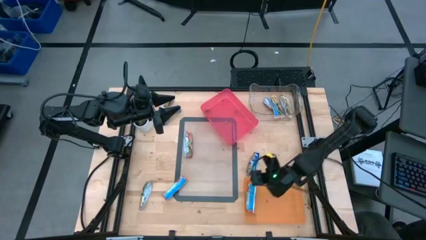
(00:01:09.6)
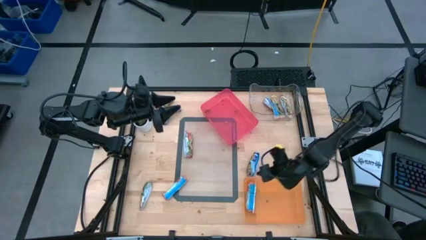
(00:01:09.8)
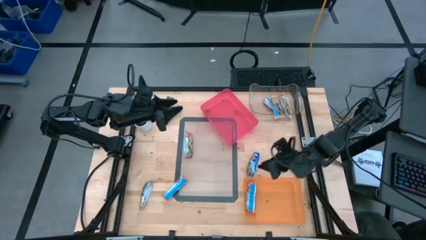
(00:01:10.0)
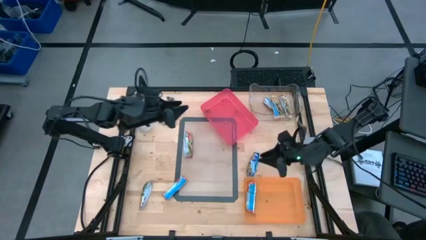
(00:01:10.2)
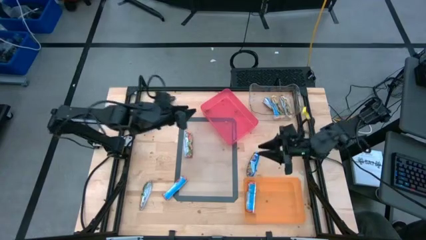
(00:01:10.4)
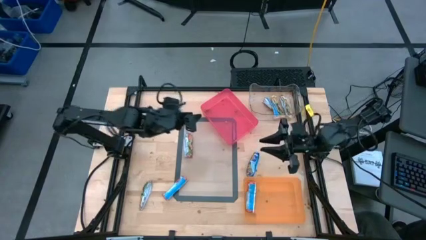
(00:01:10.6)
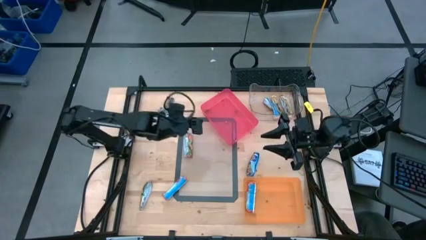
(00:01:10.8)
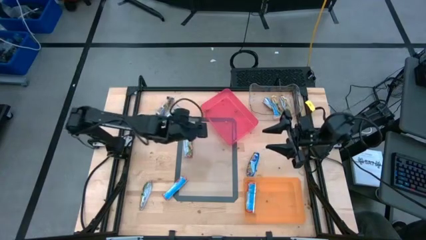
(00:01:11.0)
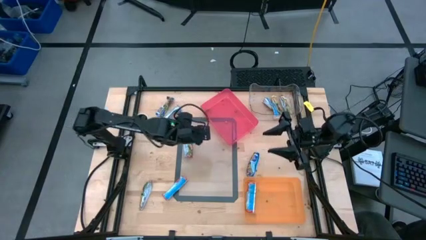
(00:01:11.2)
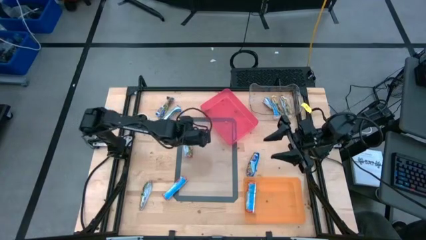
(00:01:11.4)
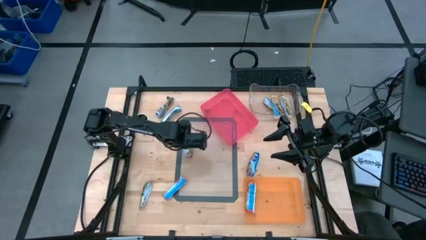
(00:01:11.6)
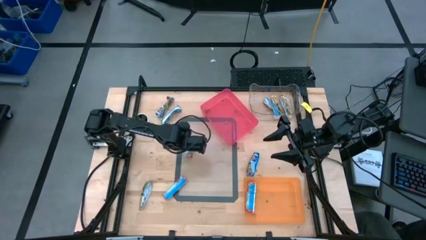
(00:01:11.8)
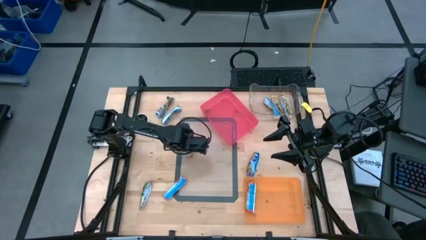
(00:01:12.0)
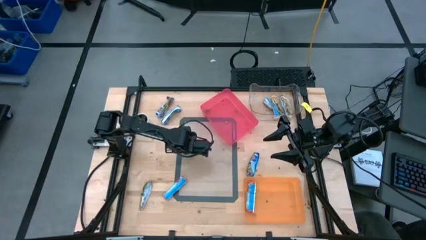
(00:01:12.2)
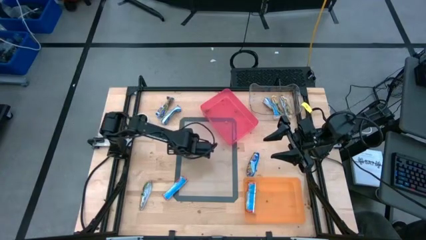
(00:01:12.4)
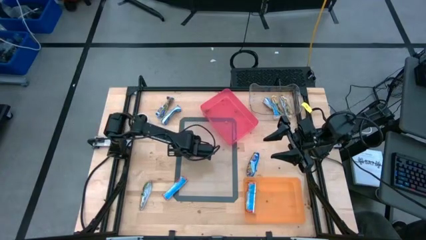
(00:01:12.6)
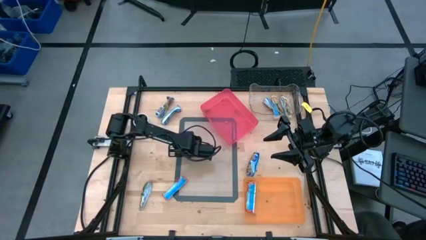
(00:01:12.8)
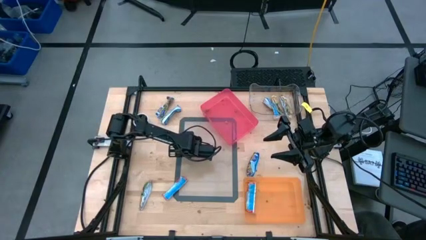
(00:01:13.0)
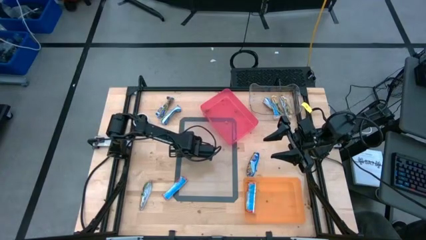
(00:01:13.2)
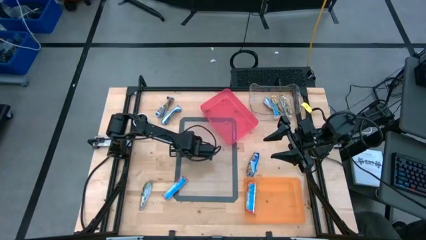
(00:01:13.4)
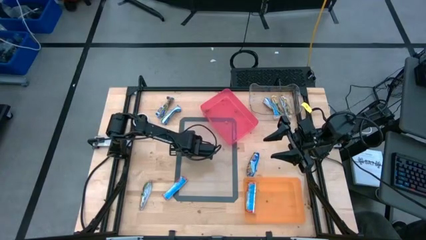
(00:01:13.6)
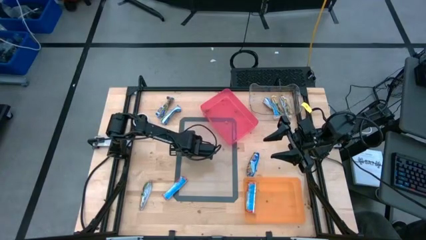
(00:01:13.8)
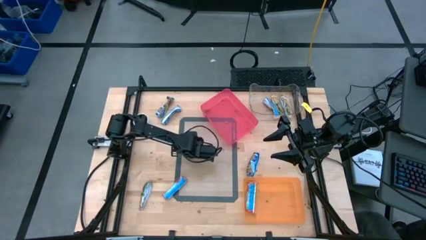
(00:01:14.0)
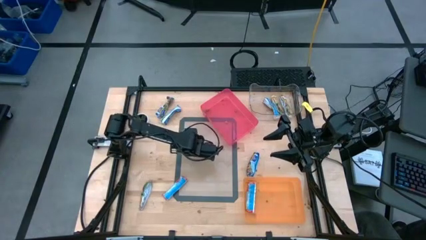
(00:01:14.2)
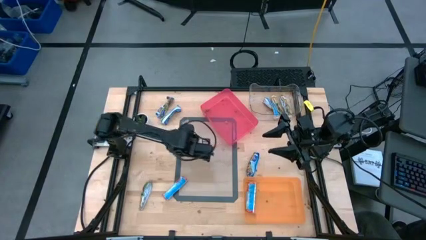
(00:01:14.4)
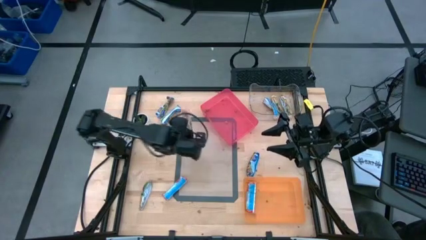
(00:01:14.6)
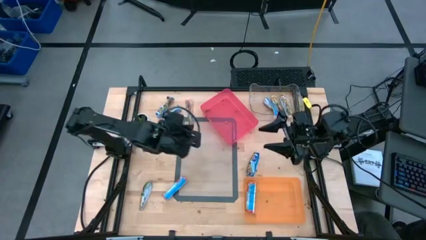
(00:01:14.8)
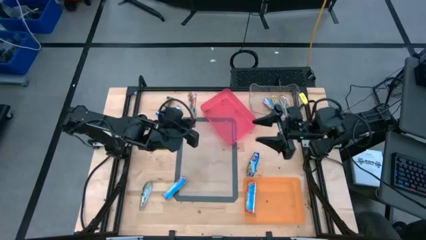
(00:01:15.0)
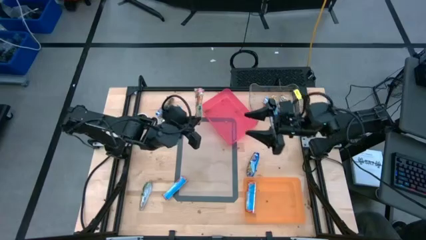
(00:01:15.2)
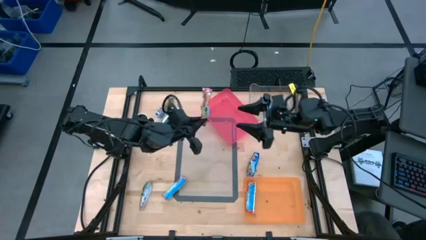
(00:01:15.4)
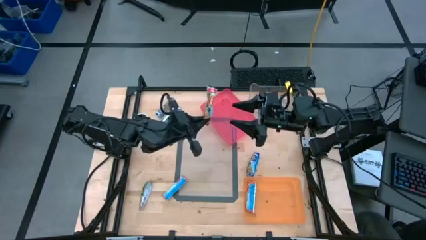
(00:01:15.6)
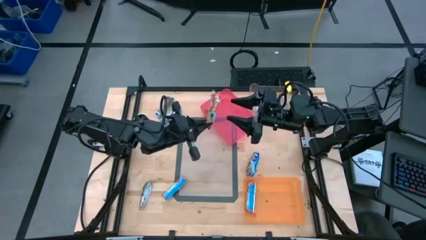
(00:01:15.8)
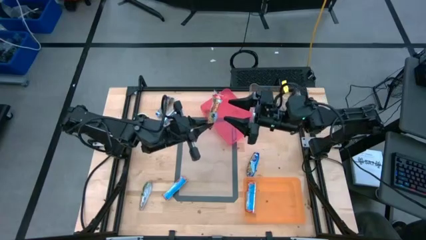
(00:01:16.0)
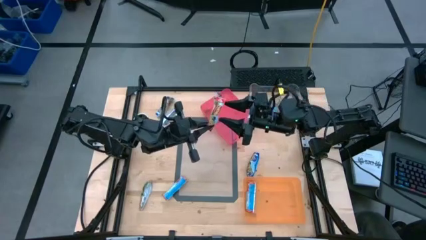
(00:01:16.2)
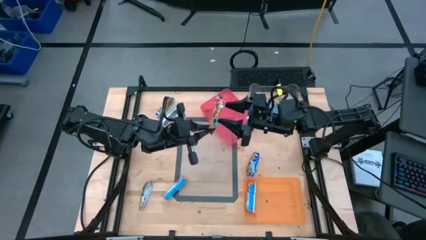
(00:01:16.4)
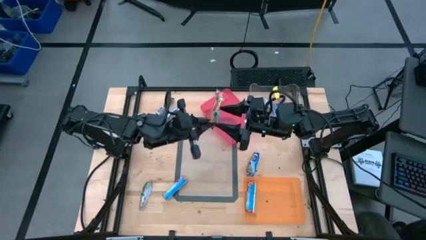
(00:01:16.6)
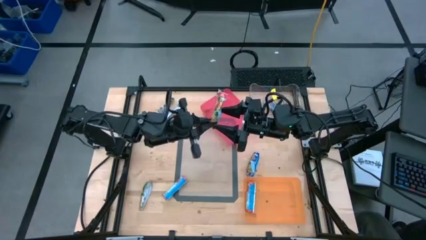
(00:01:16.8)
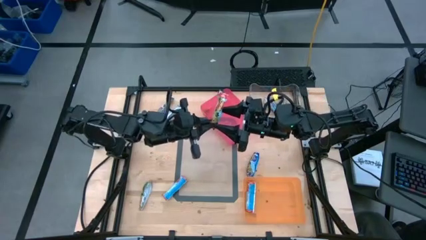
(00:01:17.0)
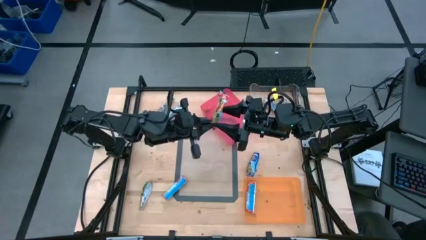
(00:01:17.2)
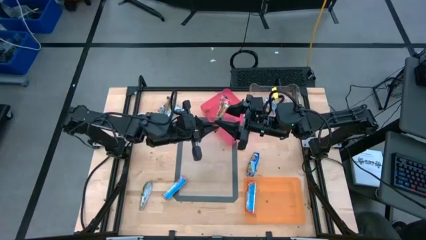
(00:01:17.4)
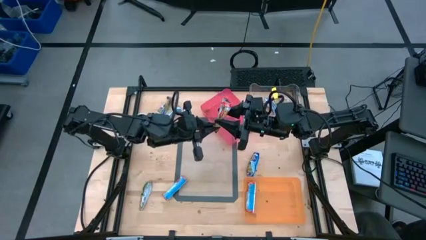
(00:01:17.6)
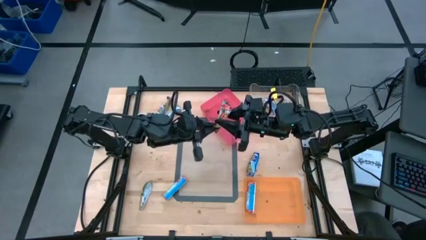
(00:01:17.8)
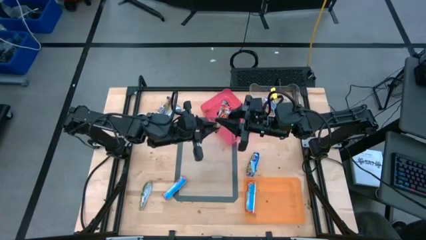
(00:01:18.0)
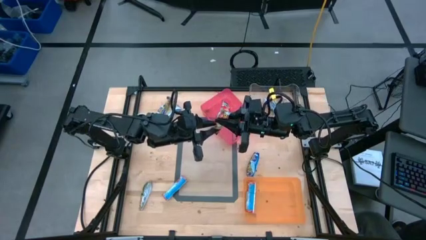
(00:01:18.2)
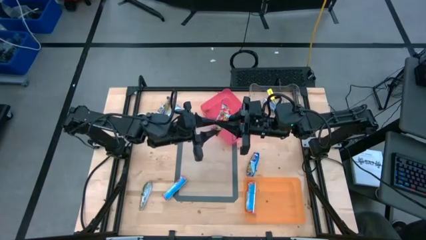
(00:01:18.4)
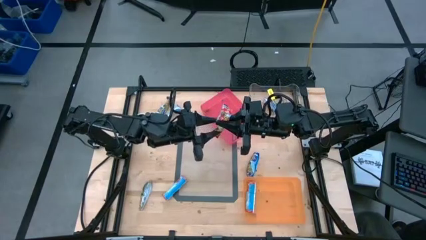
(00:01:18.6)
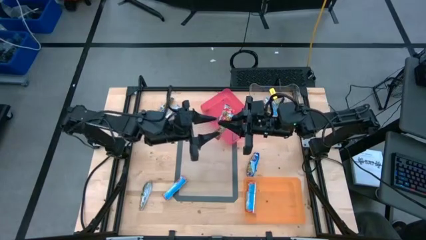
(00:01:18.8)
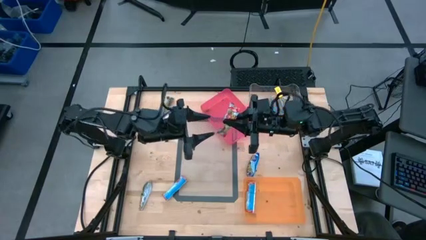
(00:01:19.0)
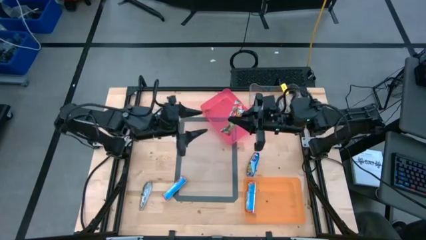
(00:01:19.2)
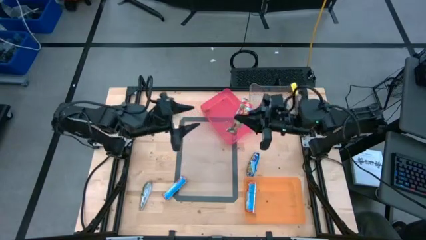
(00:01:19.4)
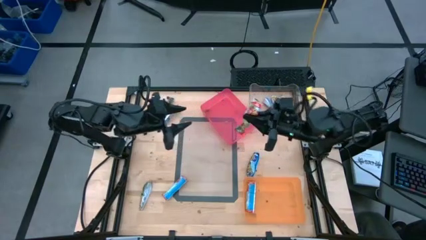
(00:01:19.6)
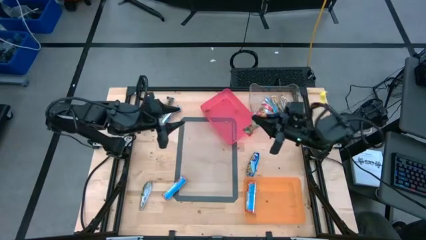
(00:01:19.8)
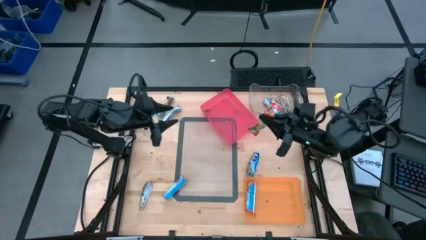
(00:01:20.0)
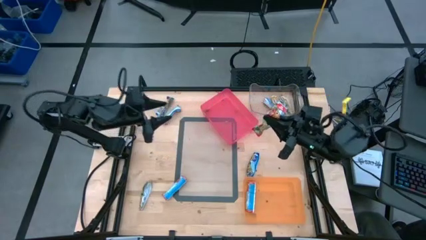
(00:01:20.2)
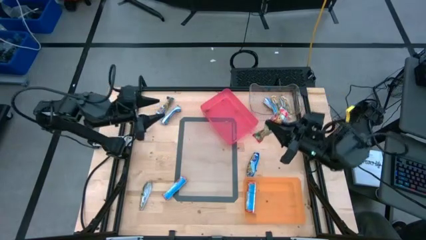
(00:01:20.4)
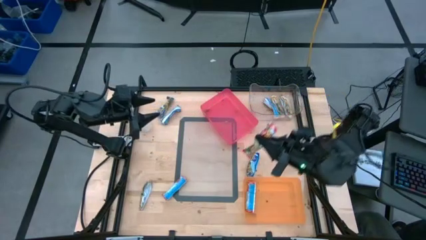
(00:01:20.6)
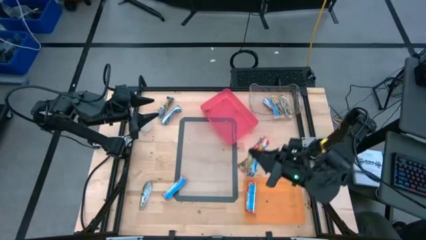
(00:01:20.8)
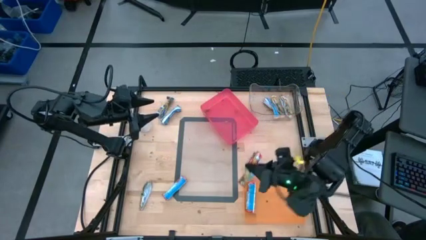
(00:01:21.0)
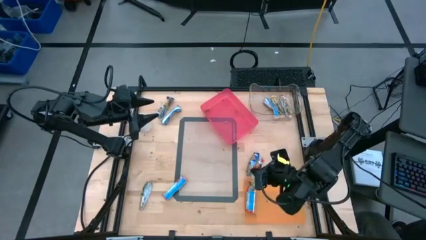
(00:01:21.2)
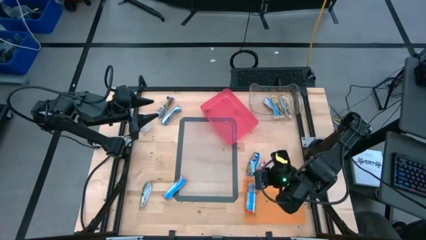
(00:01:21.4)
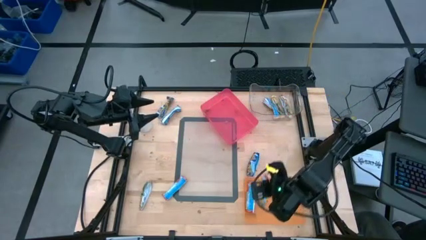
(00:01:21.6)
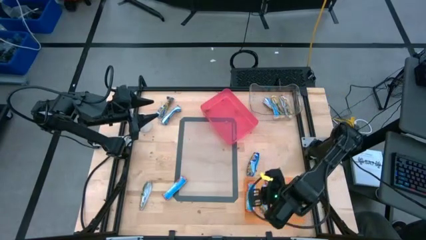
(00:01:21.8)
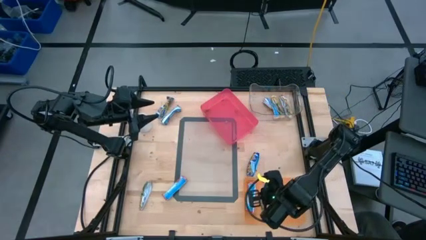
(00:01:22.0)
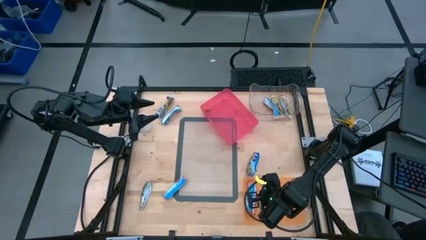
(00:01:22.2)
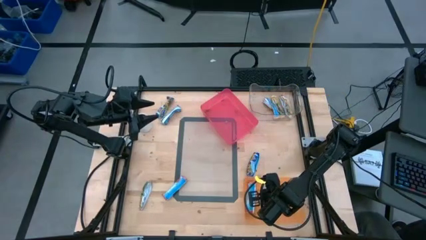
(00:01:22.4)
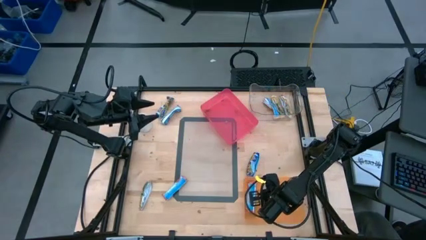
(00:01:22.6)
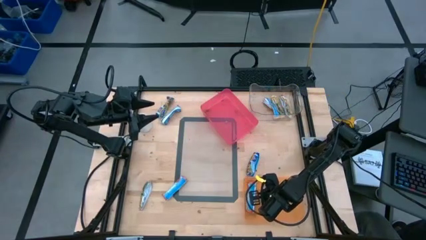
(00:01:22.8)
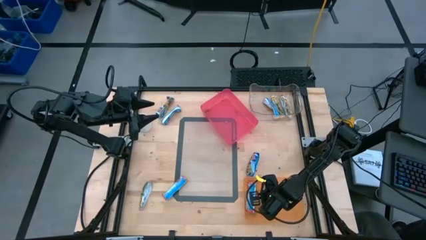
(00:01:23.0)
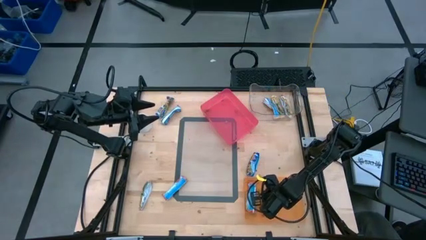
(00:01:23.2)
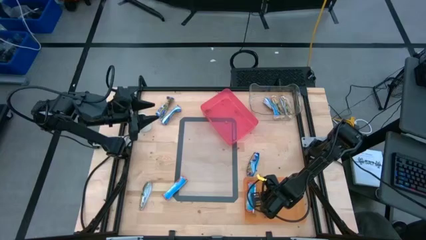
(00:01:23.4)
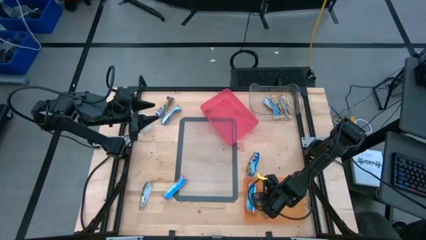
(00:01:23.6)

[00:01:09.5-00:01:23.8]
Task: Pick and place Granola Bars by type
Put the red granola bar into the orange bin
